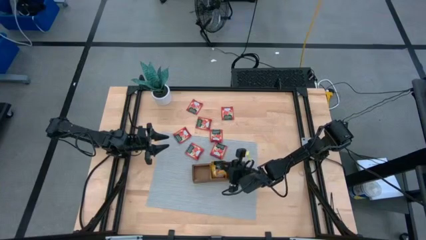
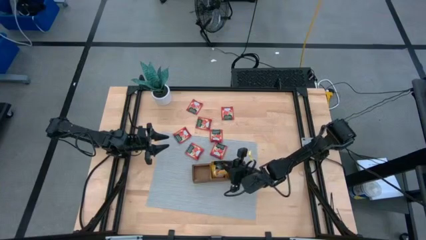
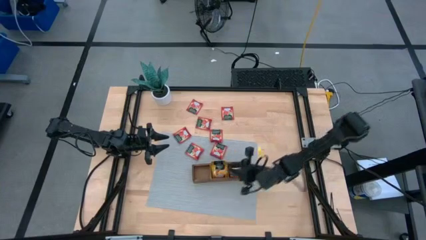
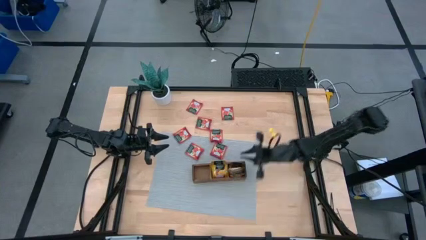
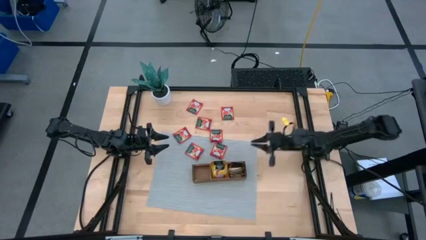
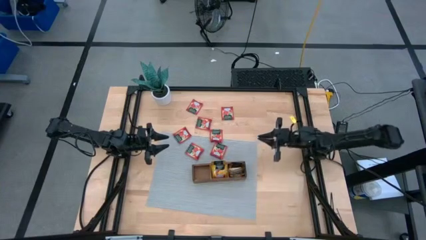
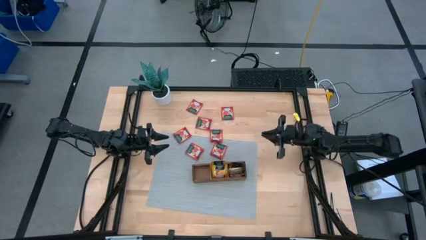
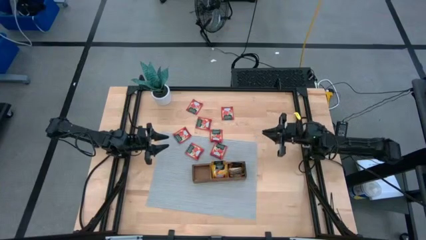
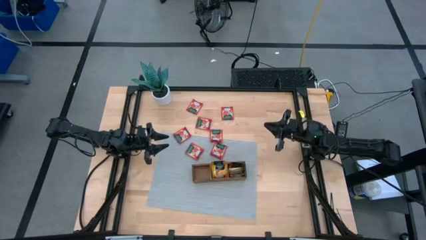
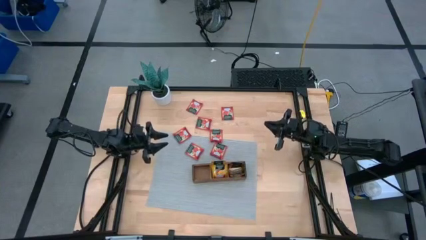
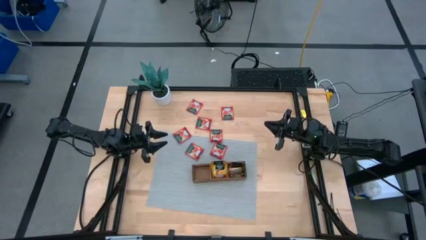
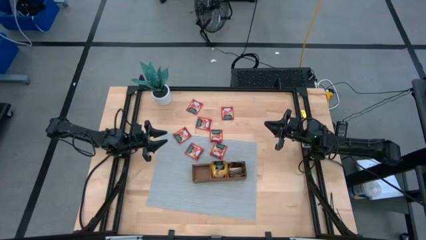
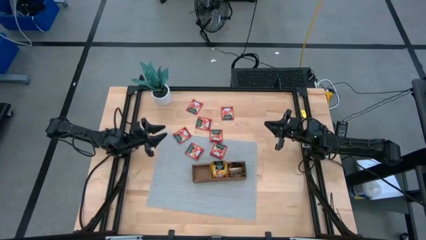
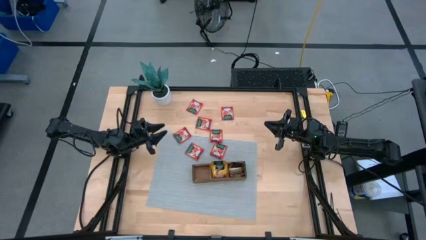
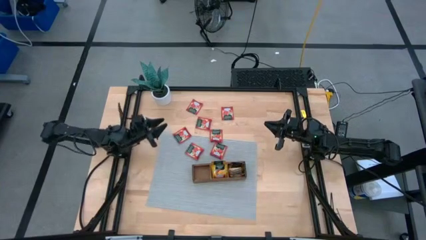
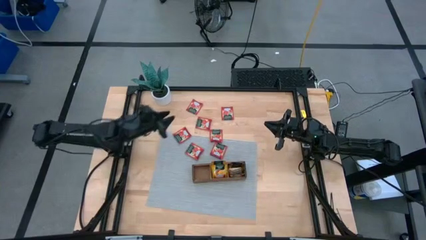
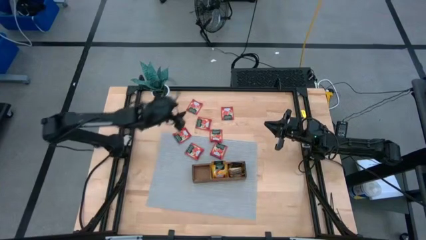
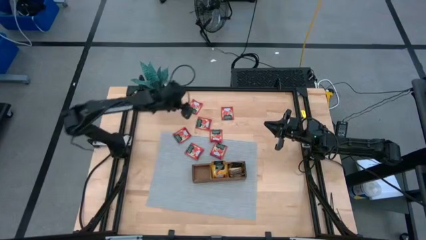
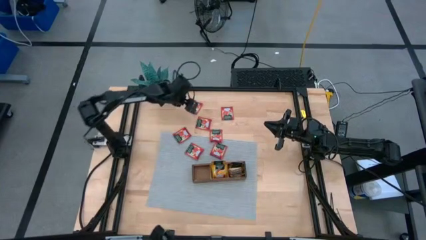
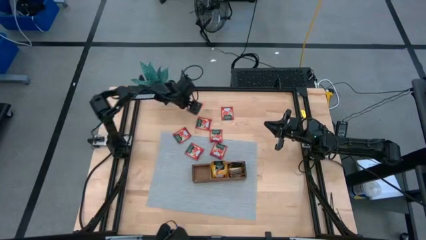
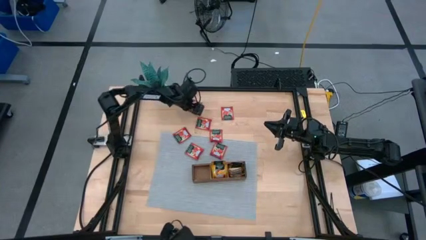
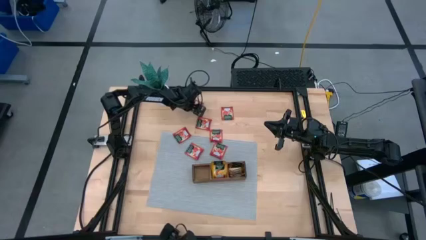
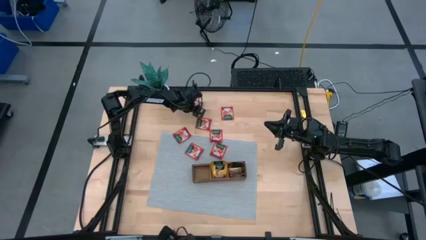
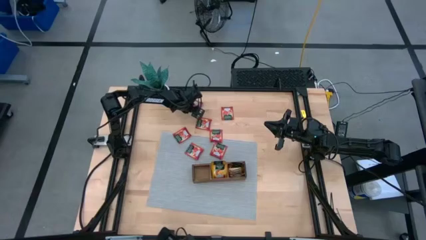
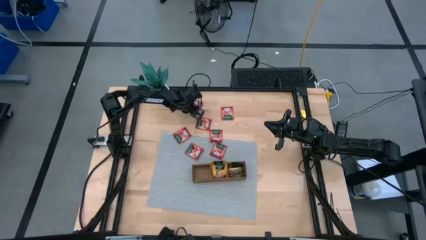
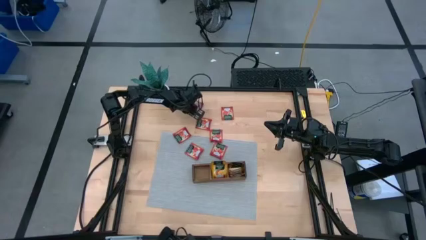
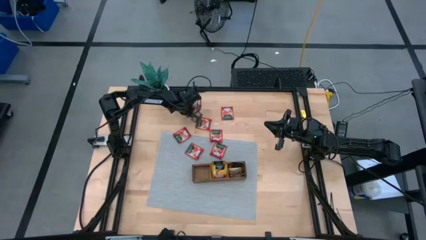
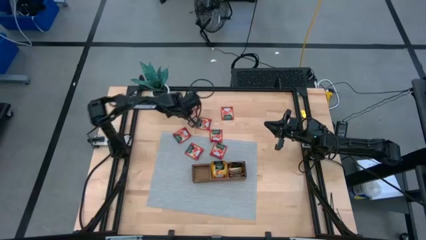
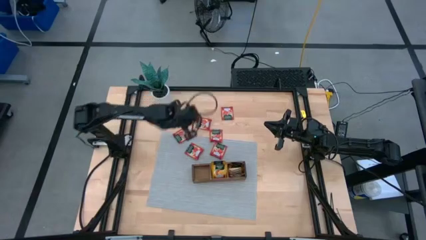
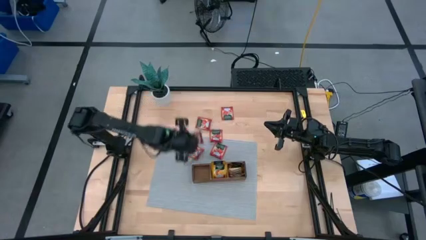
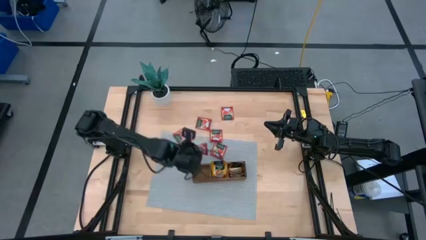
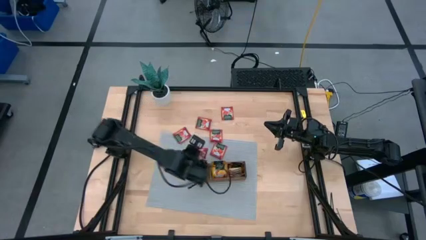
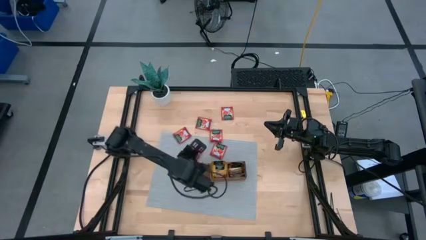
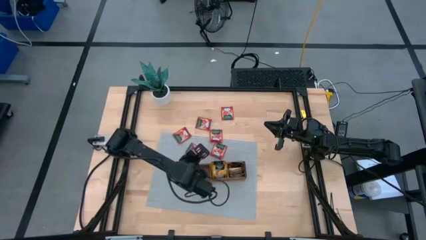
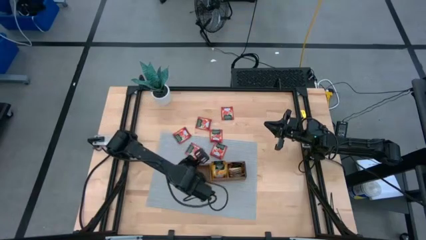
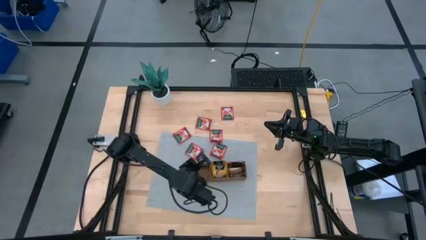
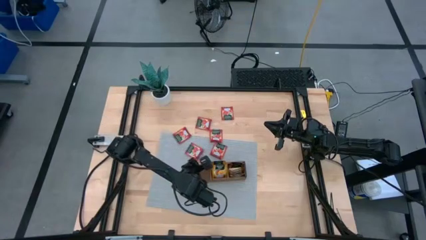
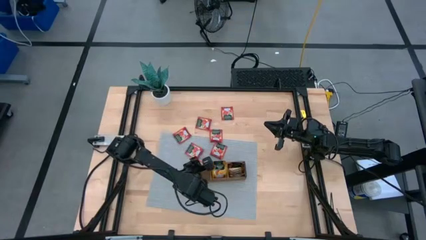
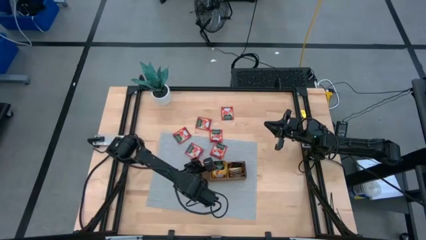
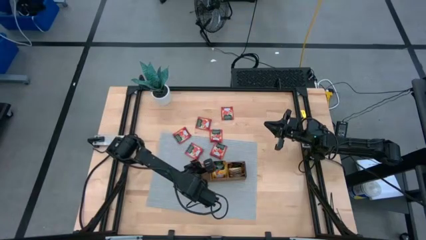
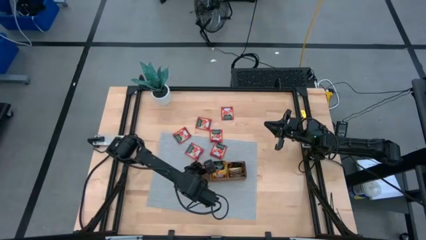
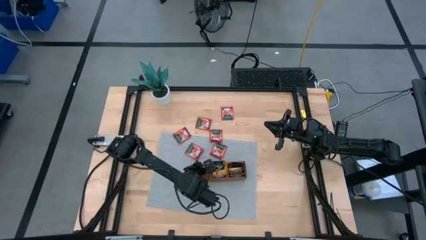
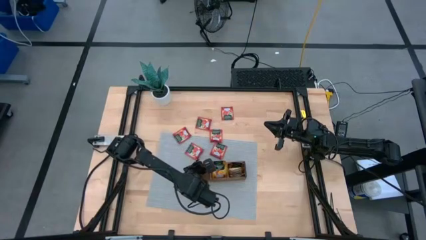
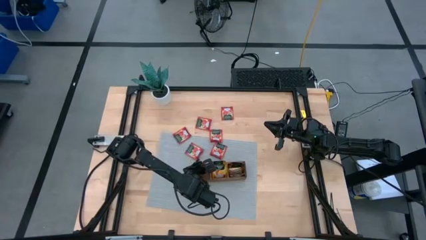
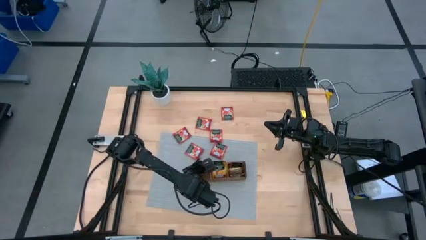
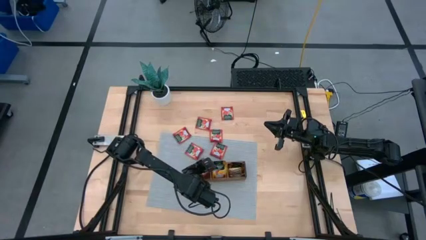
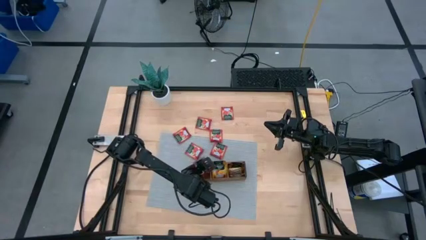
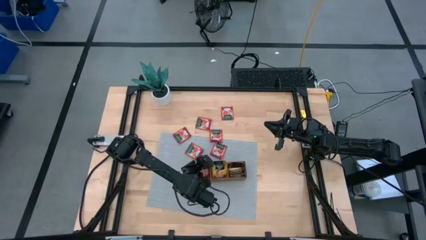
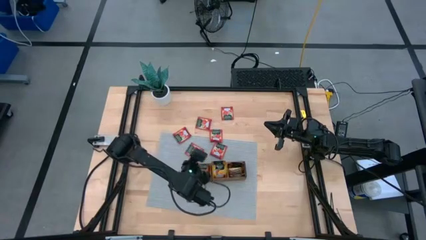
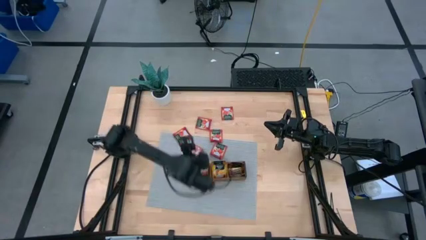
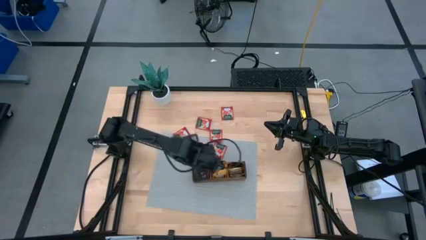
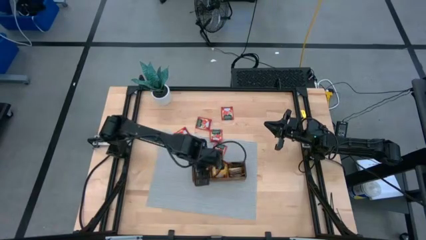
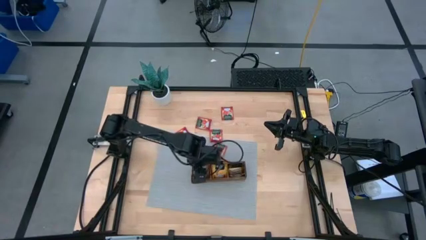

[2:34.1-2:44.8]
Task: Pick & Place Tea
Put the red tea bag into the left compartment of the wood organizer

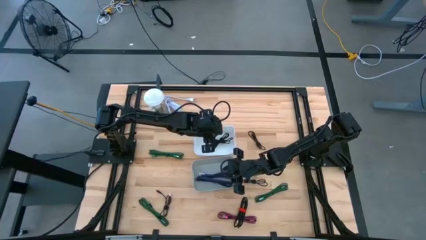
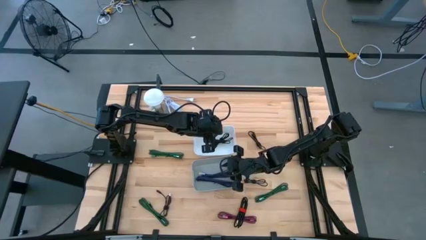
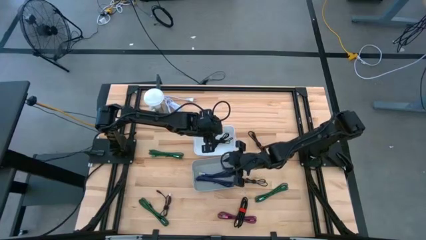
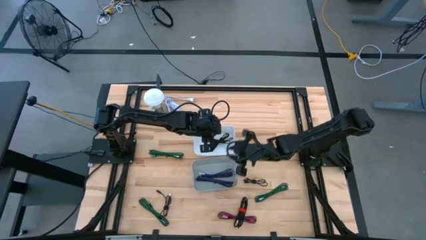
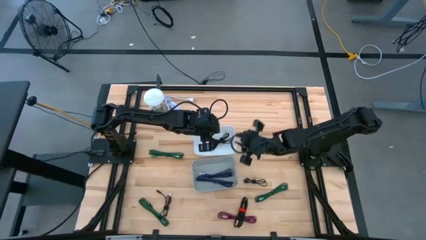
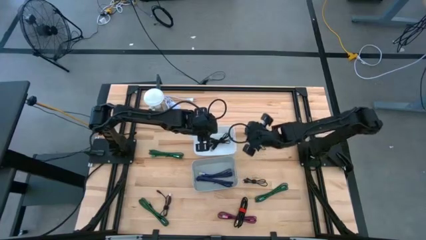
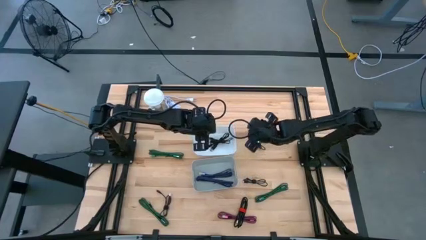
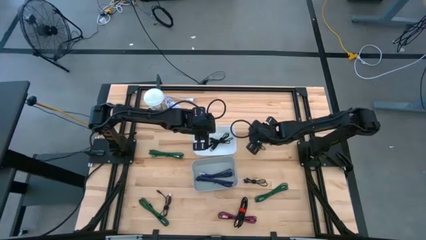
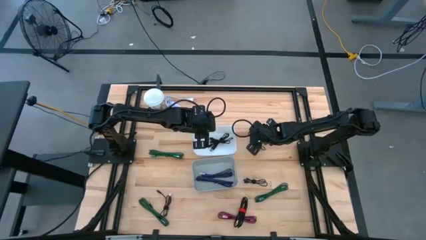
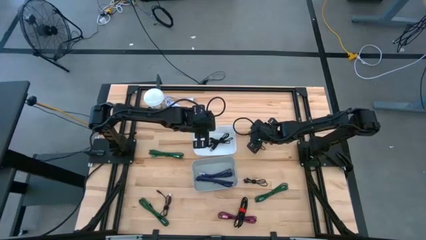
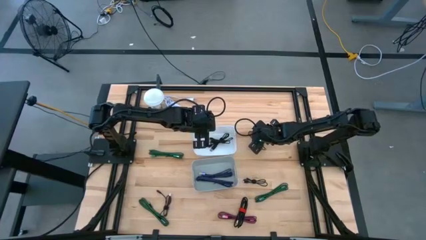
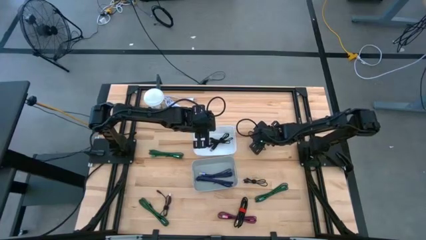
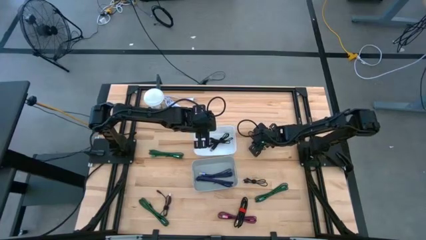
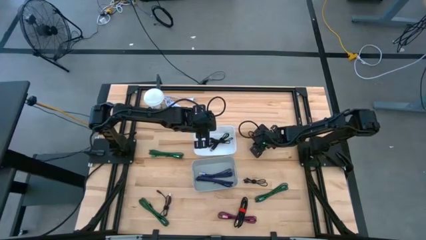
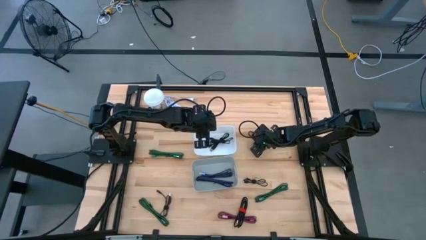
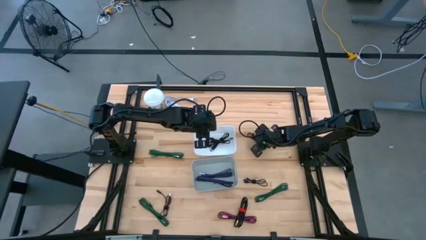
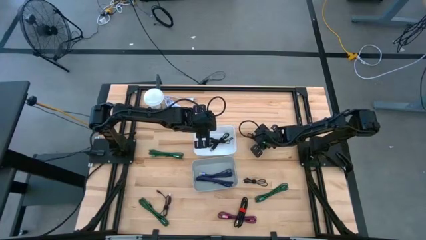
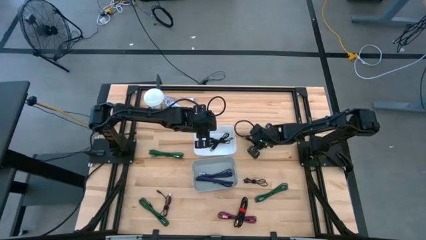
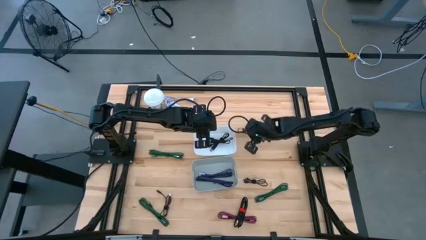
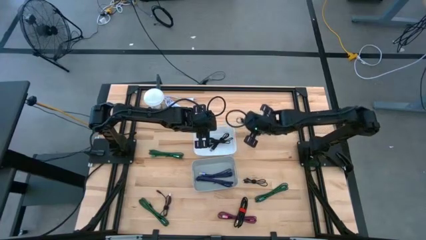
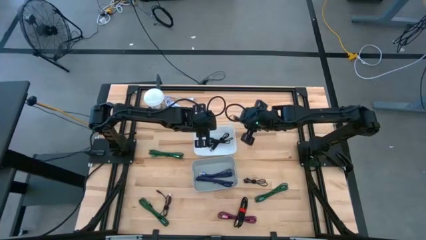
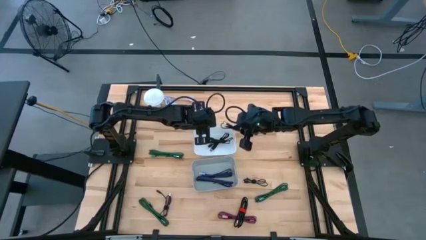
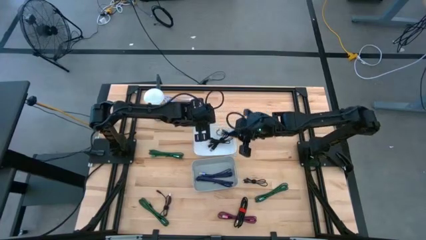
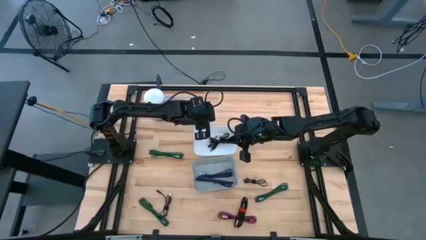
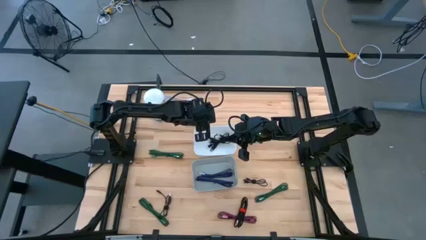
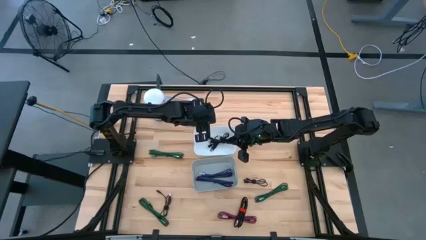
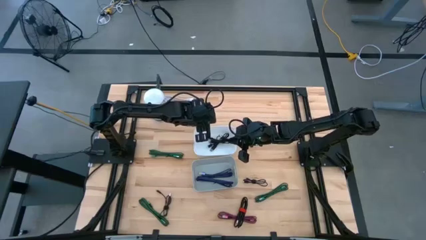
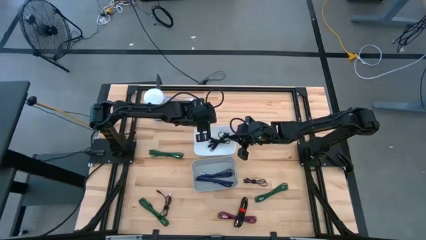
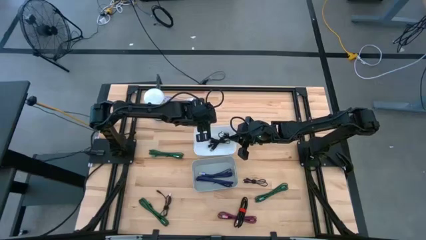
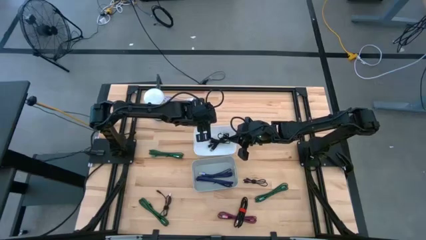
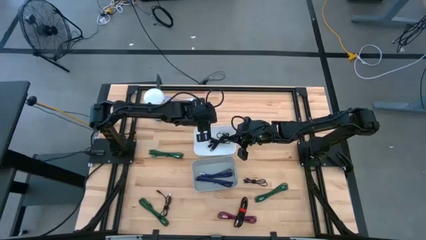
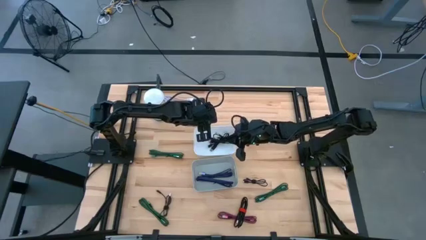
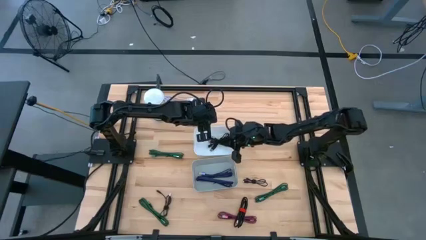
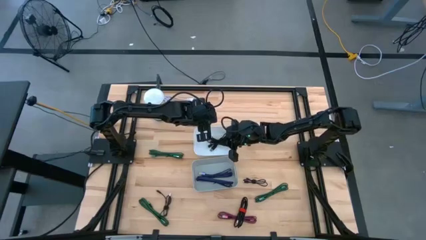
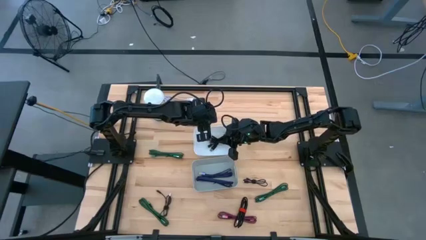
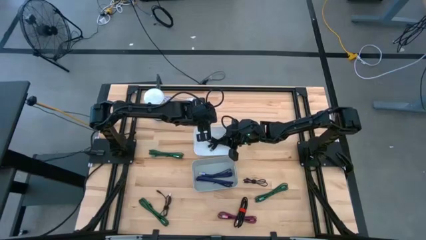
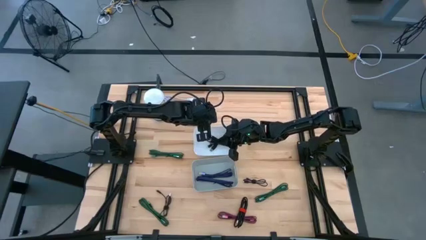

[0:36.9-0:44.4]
Task: Pick & Place USB Port
Put the black charger cable into the white container
